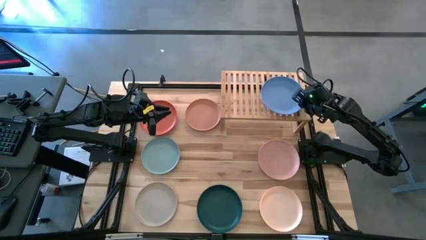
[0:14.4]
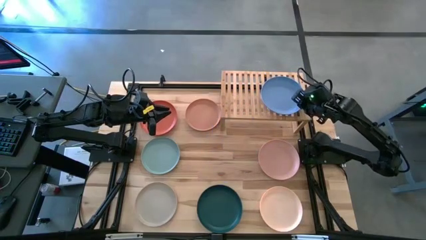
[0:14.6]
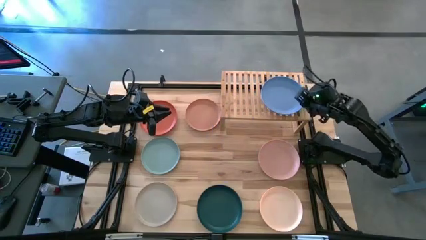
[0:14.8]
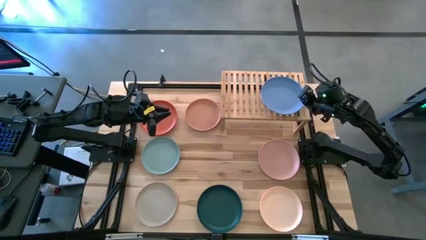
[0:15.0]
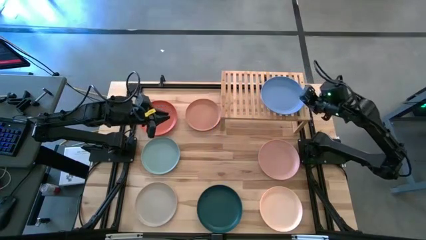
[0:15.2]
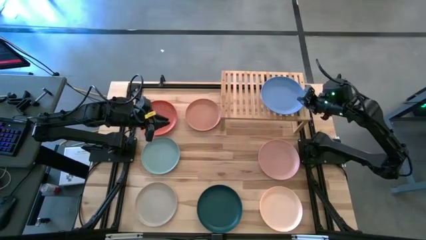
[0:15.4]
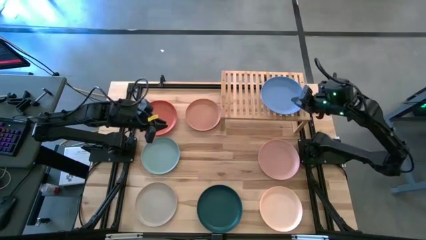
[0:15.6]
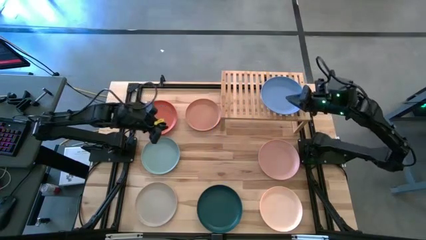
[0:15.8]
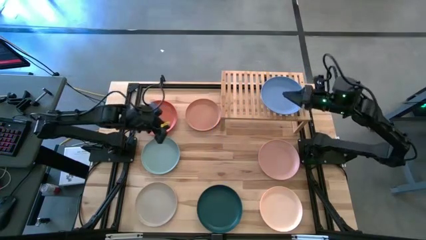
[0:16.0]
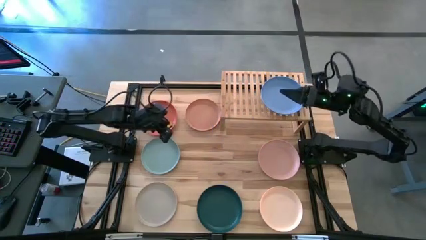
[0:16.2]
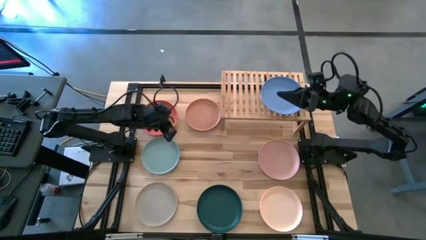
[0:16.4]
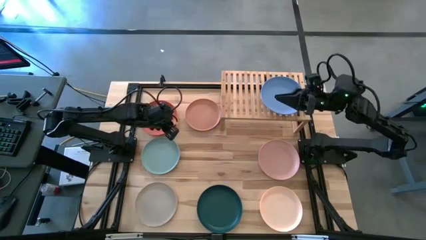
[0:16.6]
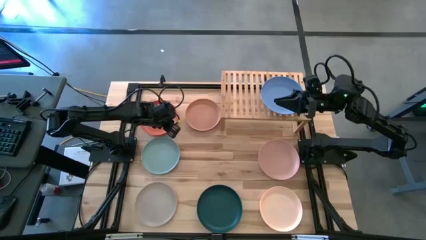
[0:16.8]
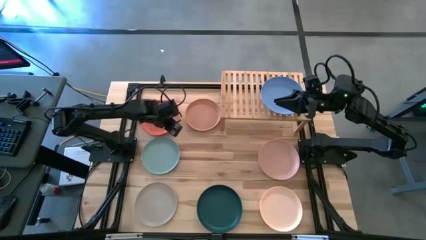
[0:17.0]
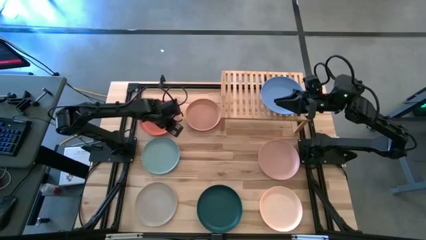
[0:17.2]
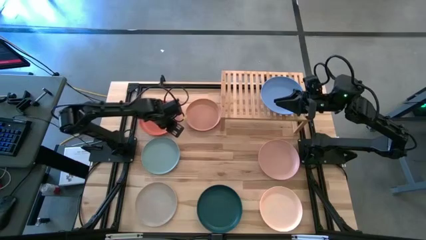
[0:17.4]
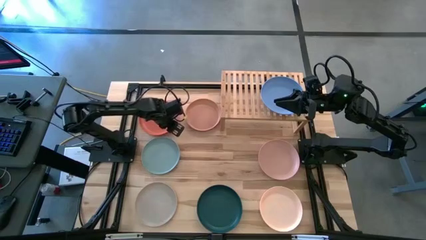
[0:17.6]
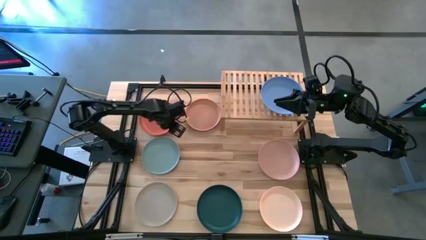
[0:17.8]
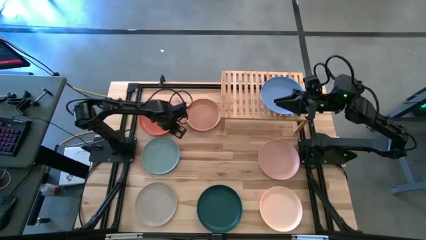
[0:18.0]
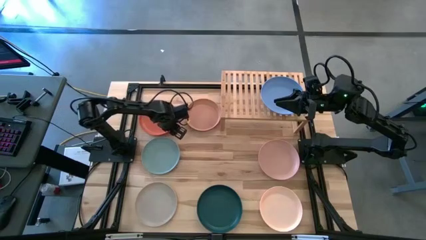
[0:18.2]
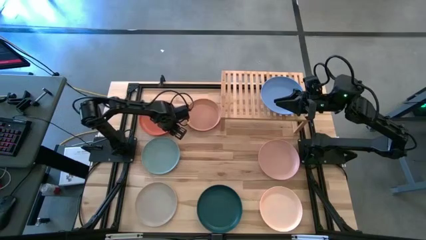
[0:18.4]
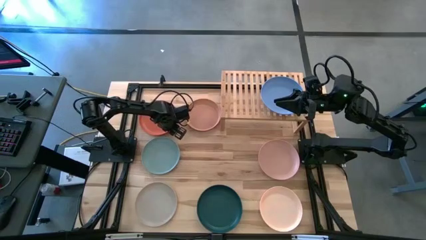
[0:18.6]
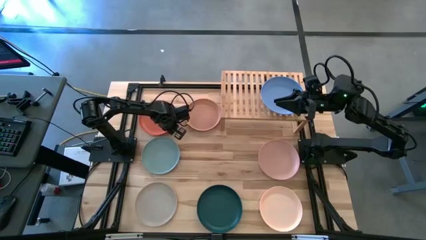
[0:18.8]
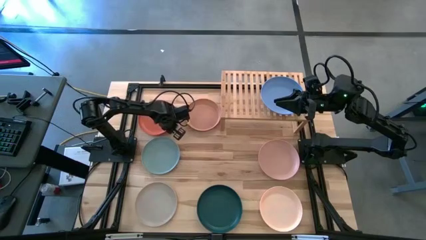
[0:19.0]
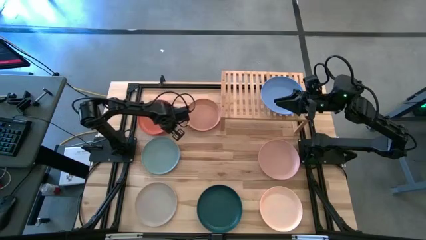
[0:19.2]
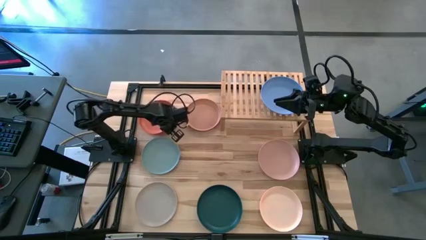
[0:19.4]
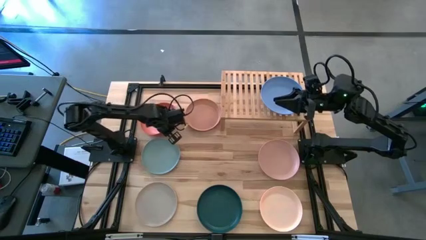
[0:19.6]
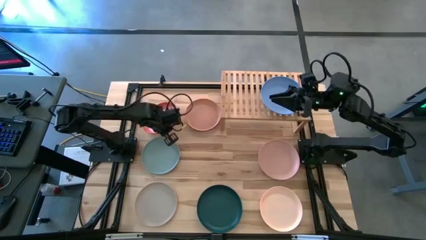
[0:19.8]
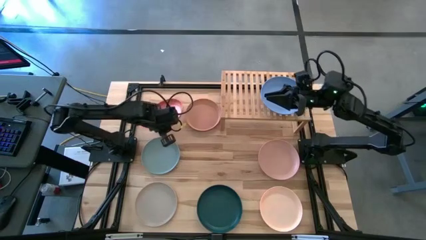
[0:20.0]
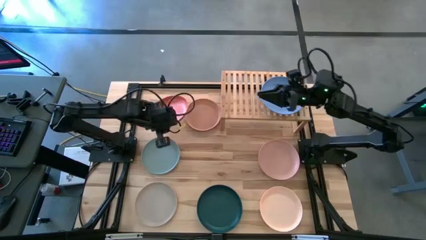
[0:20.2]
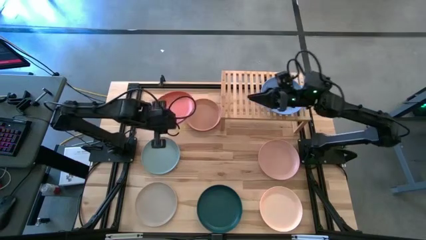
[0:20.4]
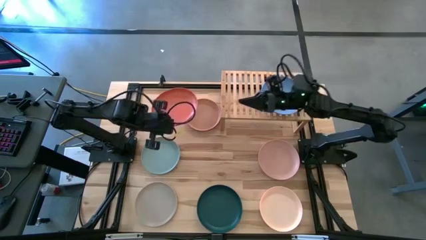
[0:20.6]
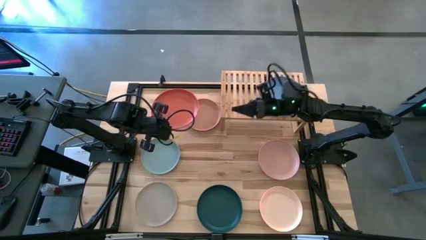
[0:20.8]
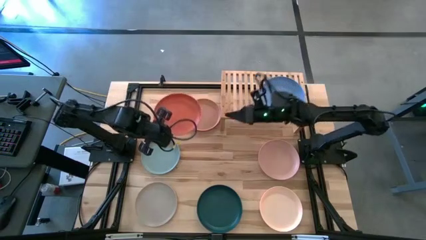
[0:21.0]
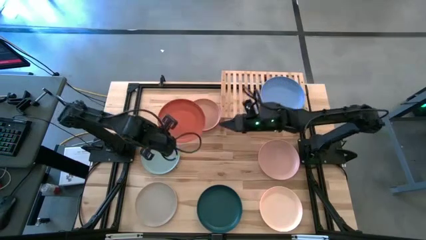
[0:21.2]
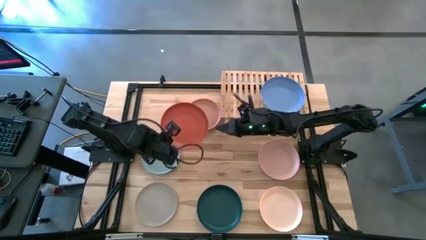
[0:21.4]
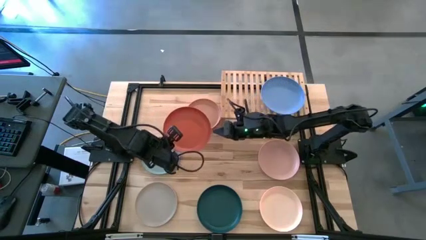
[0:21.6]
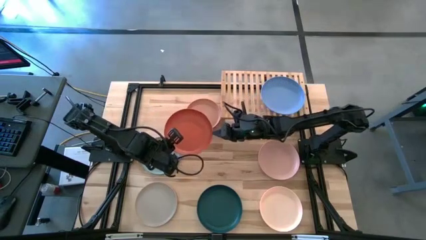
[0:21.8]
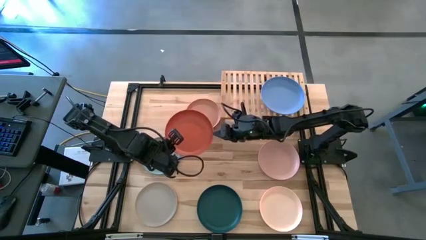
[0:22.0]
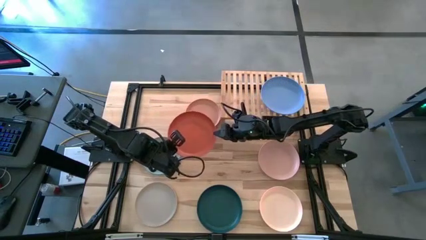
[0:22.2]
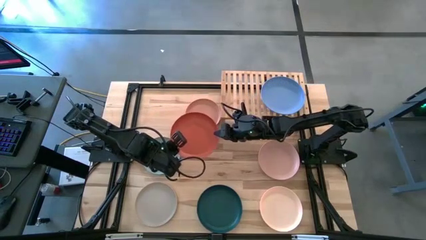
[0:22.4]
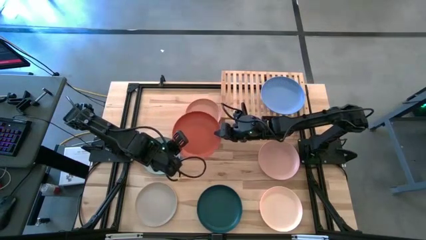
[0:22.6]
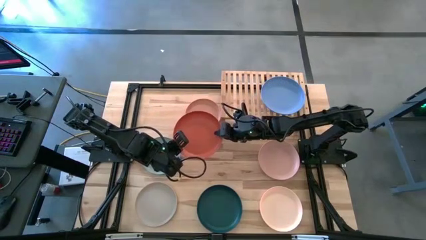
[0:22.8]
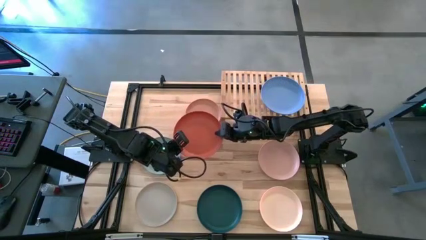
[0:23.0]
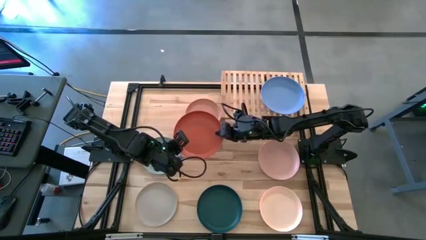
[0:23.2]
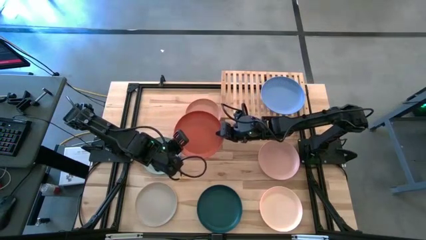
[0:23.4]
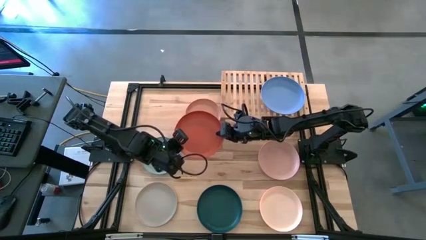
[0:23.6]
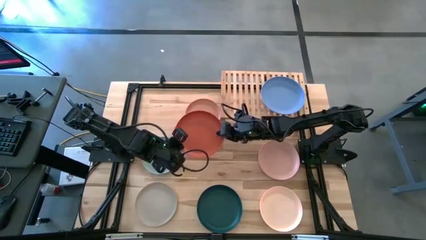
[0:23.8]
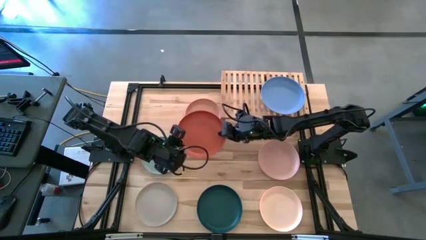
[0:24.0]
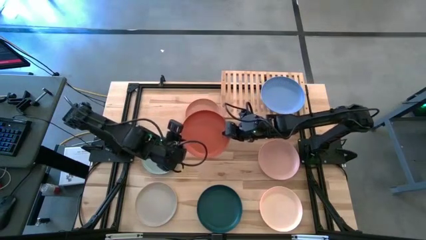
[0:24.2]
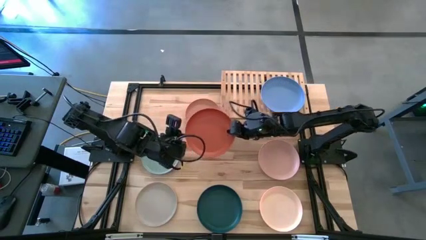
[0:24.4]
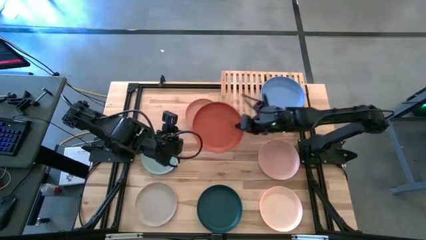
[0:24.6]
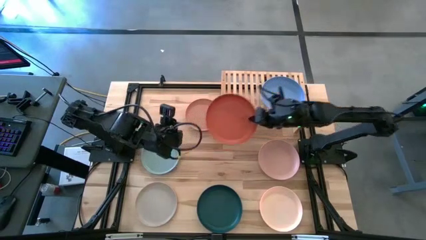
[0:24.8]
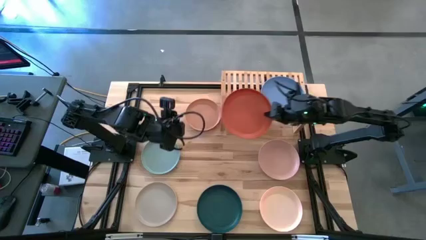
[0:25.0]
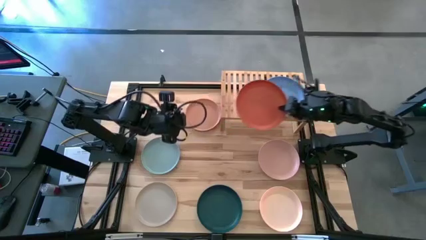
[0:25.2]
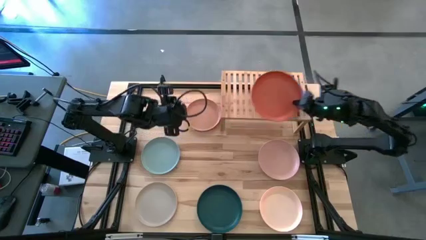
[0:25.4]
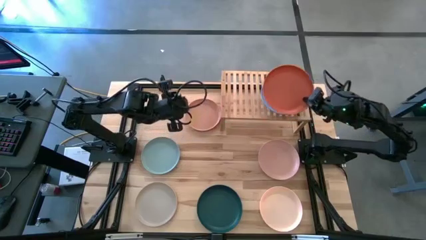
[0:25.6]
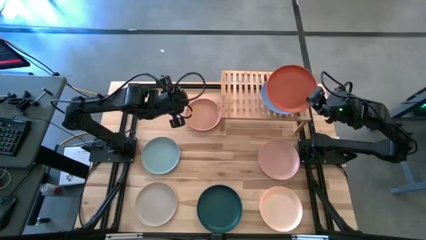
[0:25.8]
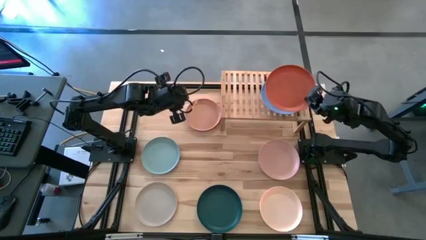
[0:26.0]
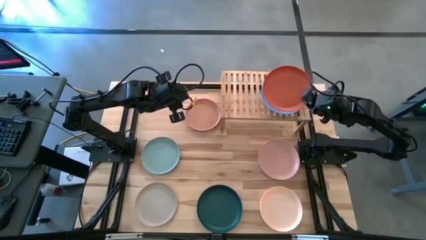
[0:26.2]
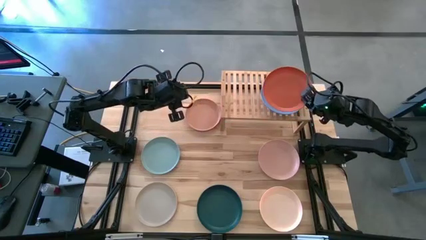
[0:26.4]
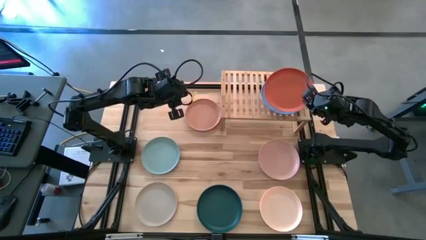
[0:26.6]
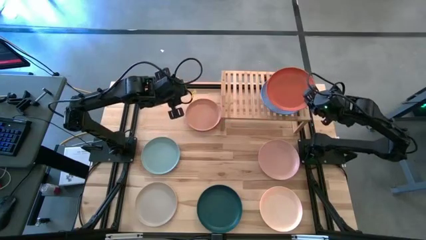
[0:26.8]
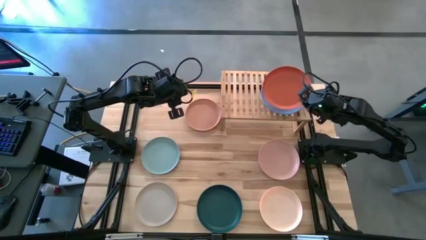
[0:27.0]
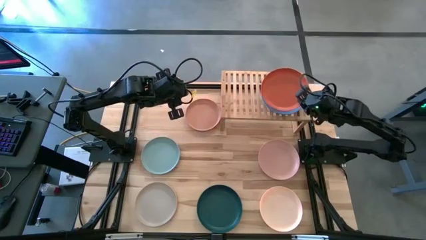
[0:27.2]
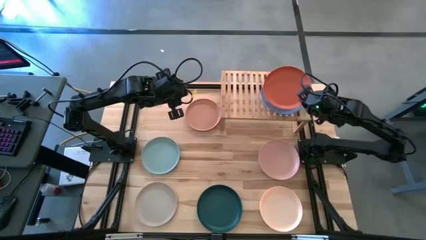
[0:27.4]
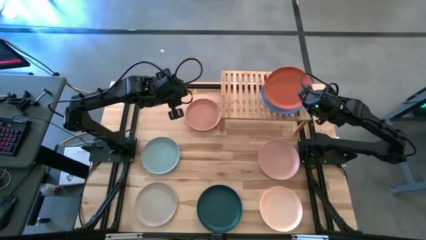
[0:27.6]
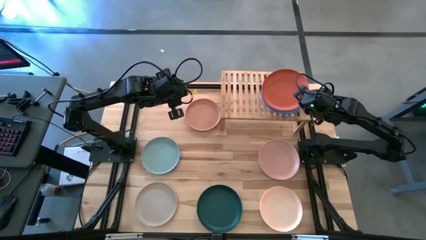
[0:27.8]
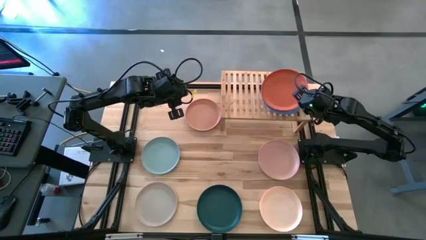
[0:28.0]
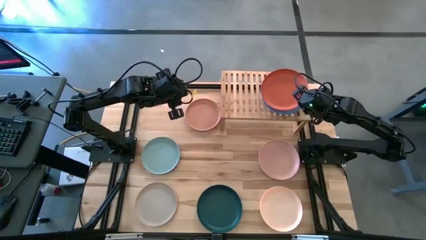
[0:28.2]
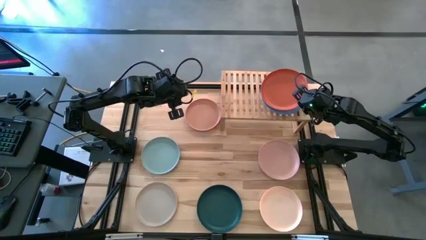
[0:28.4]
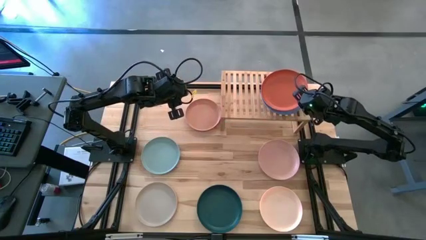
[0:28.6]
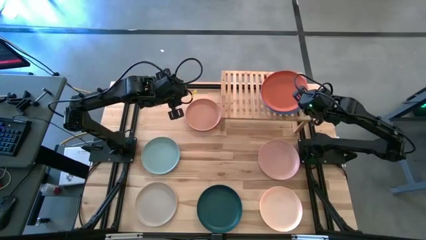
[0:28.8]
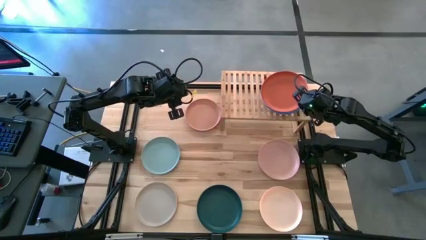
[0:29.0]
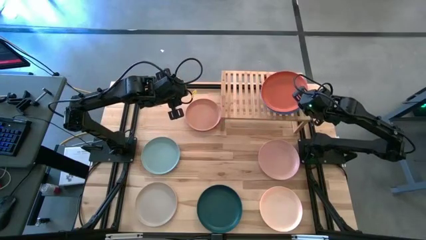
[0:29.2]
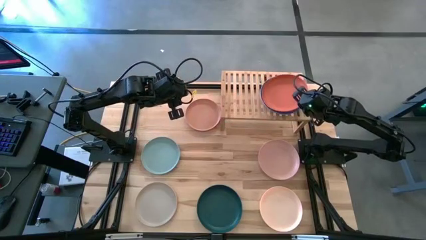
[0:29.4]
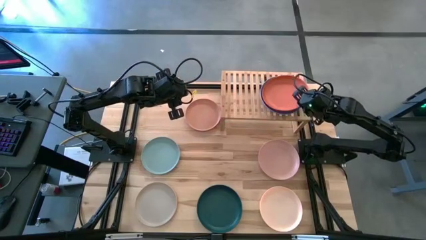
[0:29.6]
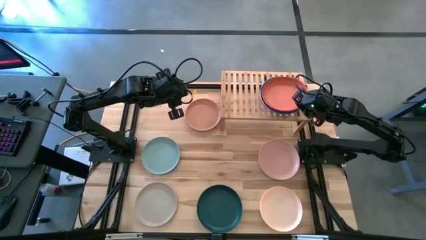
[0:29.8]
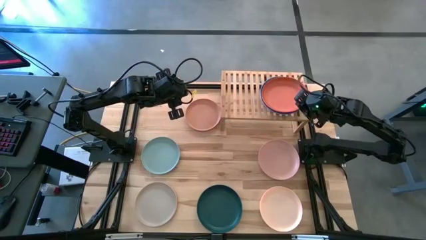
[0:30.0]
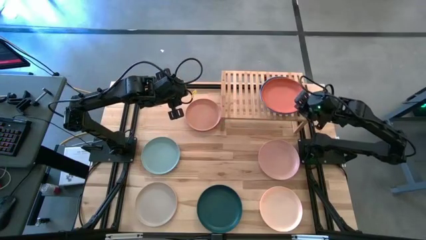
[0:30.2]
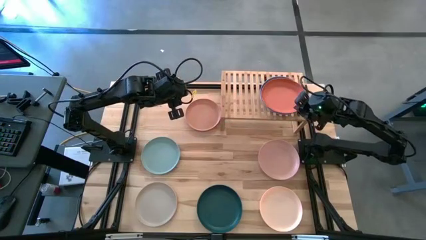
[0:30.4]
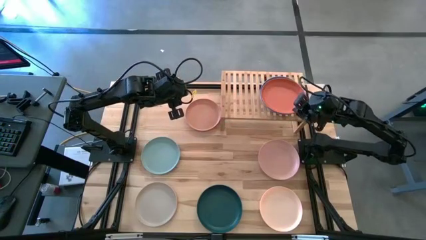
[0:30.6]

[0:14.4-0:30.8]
Task: Place and stack plates onto a shelf
Stack the orange plate on the blue plate on the shelf
